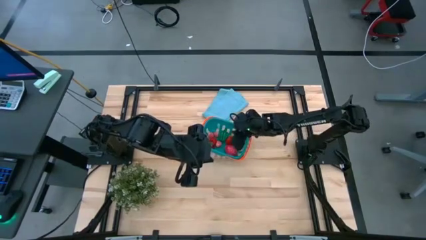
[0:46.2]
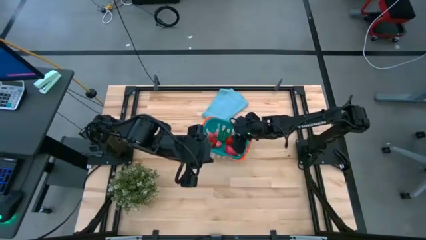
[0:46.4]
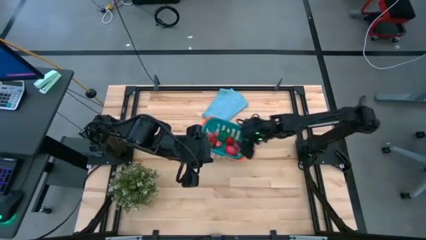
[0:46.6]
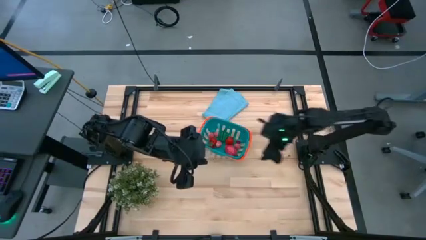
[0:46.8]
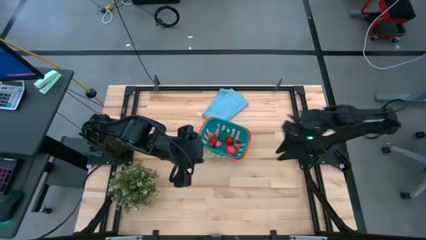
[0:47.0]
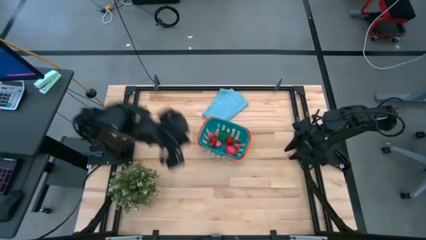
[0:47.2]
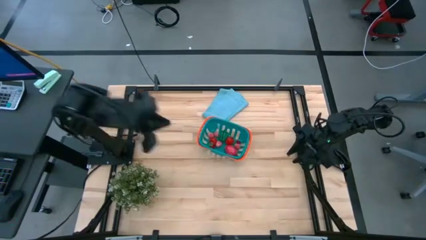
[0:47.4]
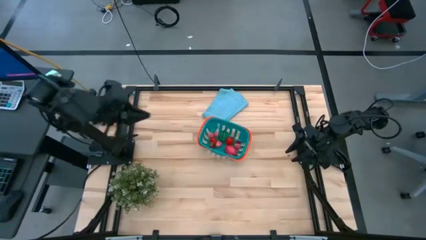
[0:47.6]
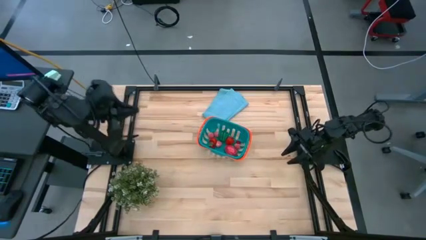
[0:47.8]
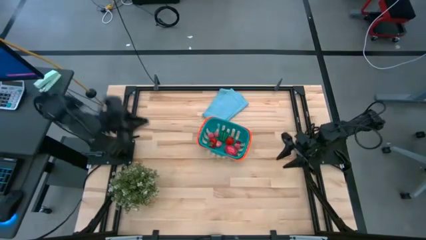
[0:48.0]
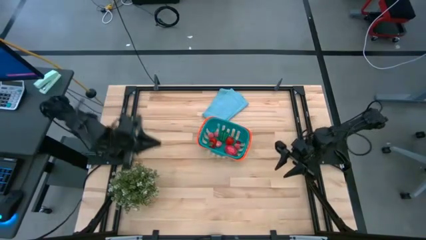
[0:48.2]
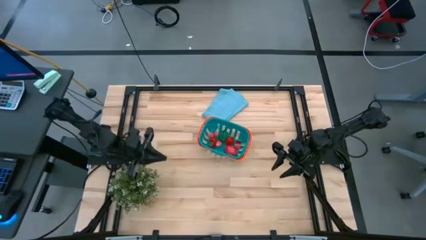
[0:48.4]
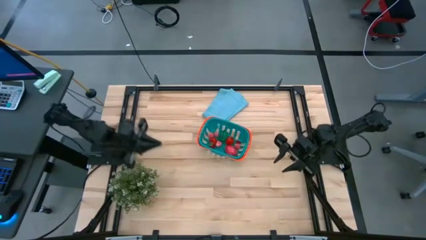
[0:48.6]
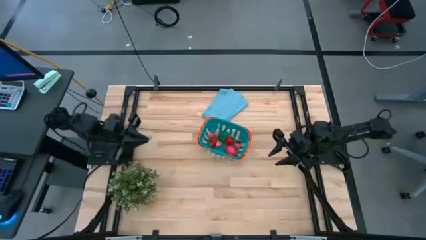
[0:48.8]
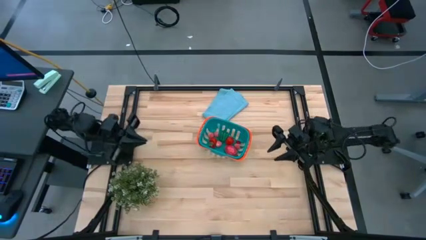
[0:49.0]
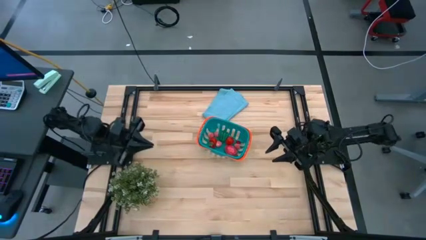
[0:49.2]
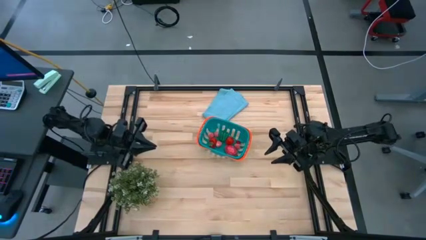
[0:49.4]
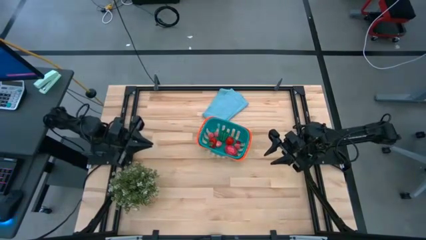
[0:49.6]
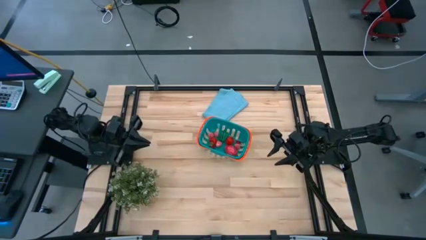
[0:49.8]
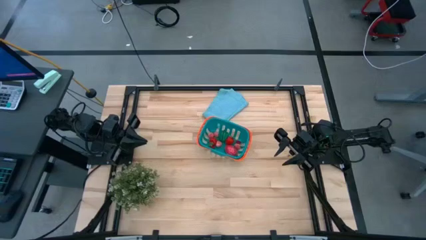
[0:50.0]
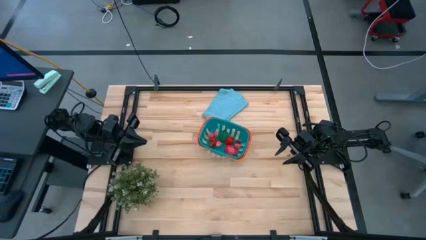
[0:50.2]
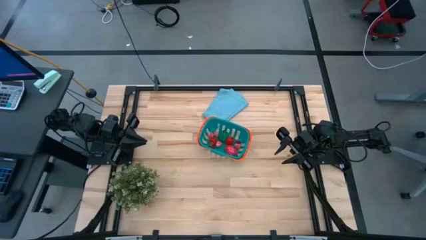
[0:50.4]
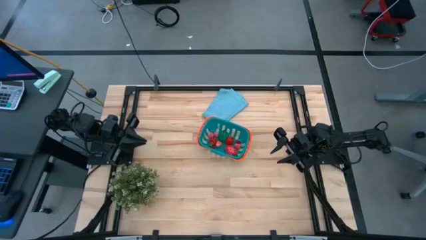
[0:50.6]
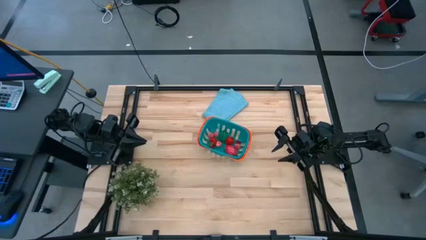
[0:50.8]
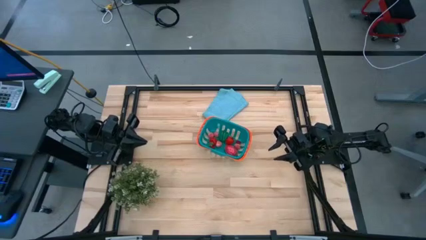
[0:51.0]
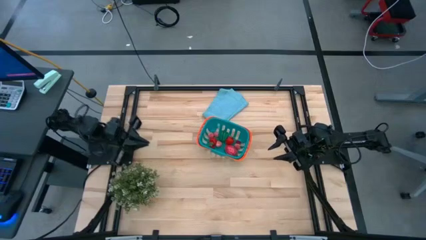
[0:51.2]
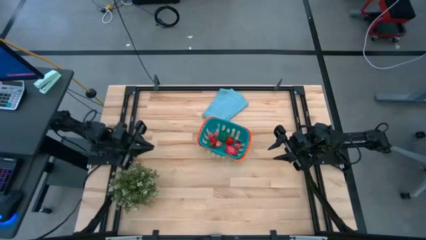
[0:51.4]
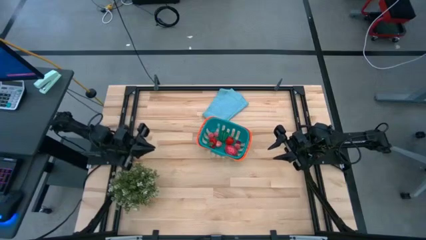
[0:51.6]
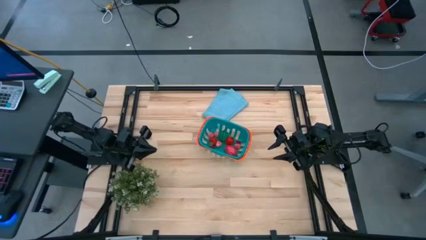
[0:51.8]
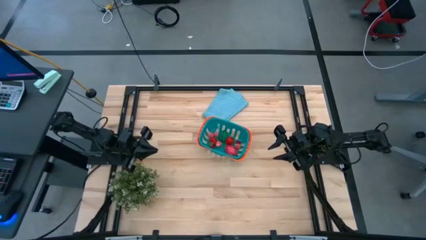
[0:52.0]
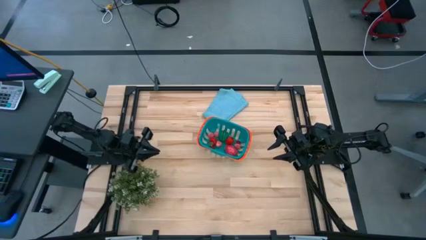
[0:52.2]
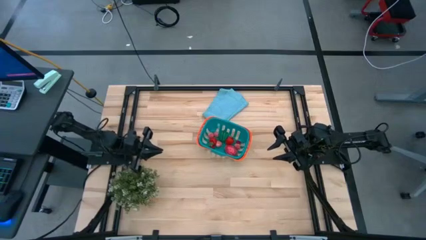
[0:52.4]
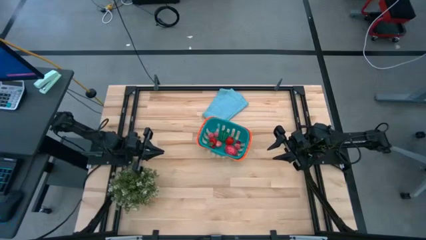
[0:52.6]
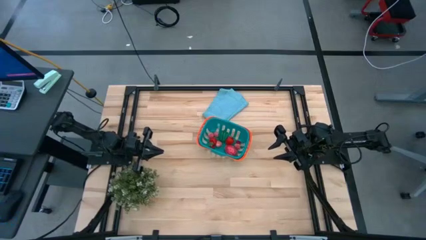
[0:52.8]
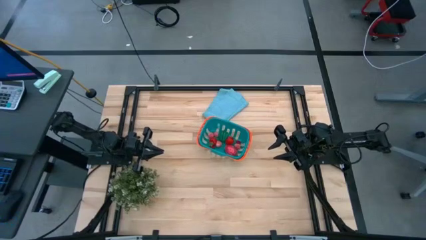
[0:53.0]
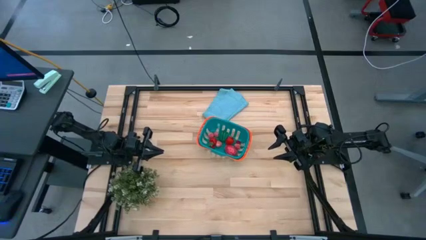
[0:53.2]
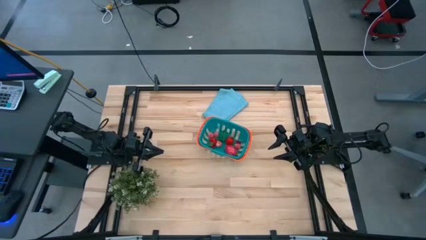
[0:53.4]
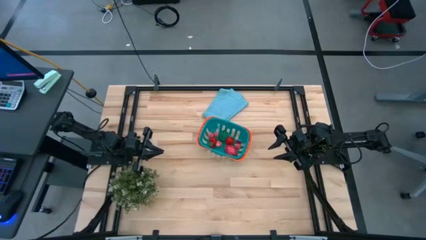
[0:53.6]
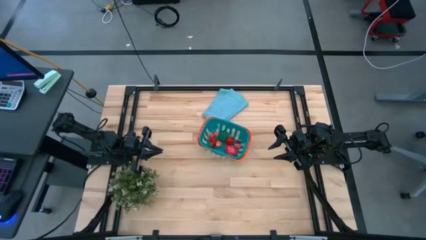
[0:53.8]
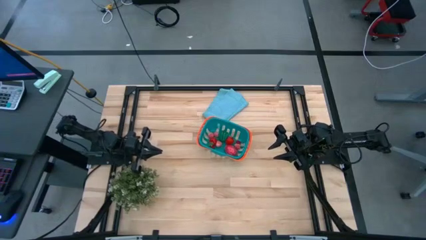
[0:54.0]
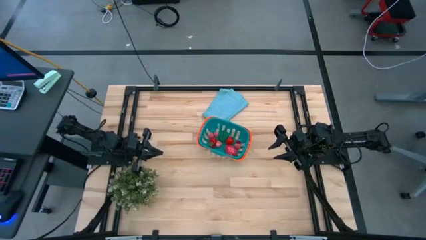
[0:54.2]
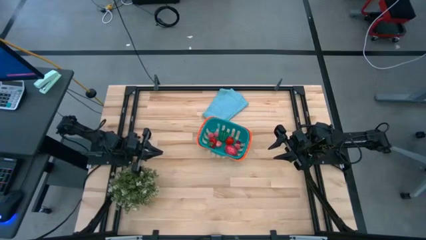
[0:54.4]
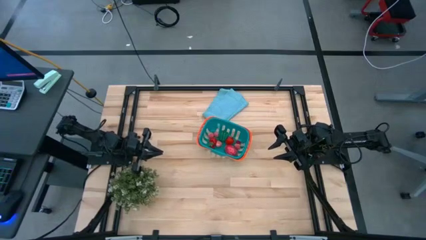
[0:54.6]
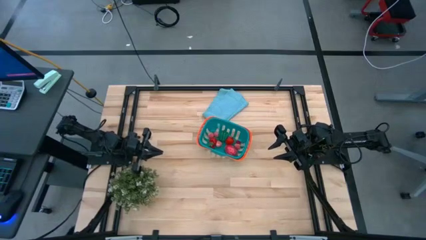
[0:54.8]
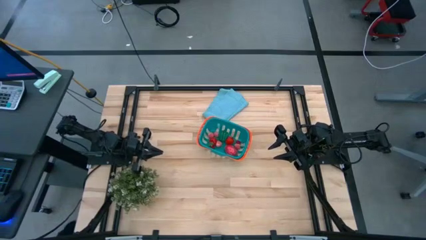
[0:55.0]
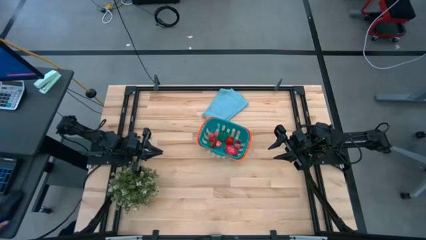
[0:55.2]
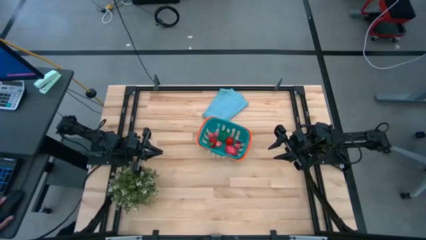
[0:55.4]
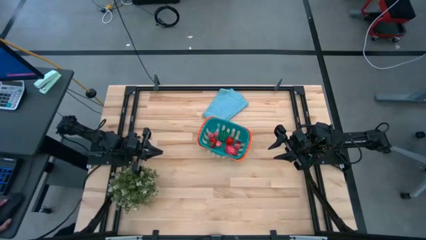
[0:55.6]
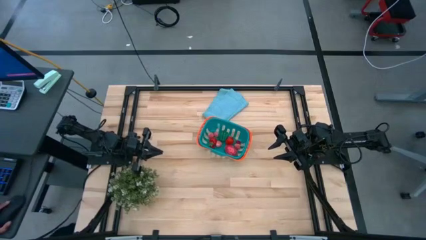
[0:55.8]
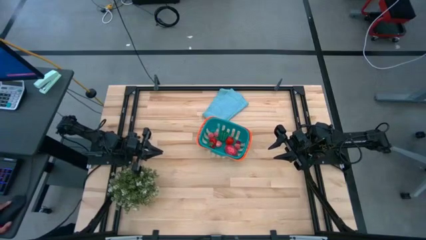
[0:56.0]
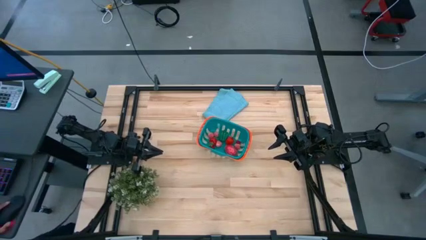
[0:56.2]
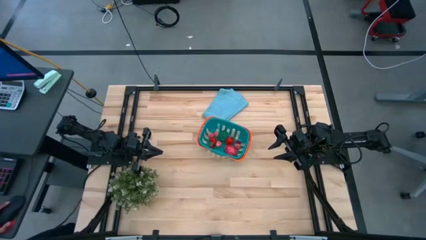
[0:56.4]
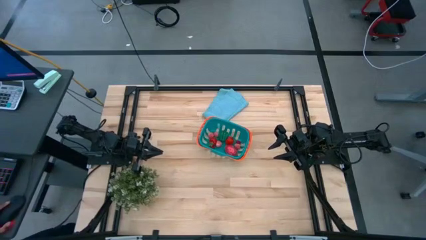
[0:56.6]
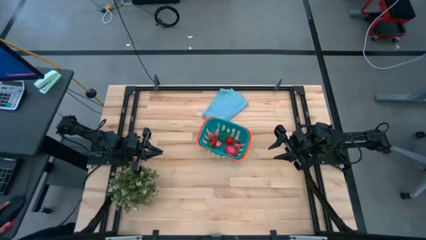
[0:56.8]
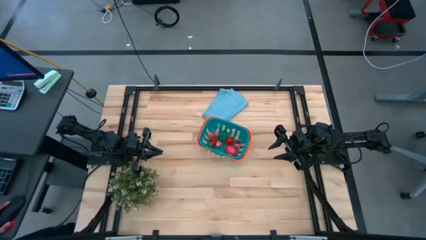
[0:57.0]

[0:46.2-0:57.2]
Task: Pick and placing Produce into tupperware
Return to Home Position
